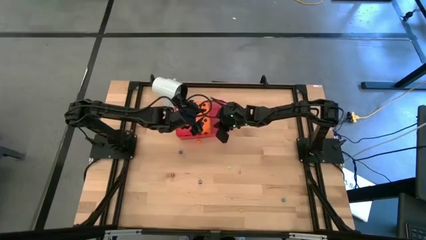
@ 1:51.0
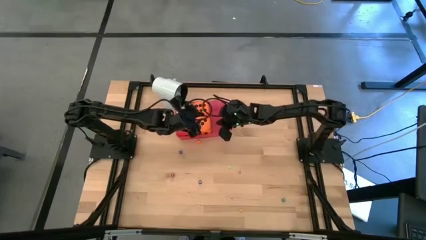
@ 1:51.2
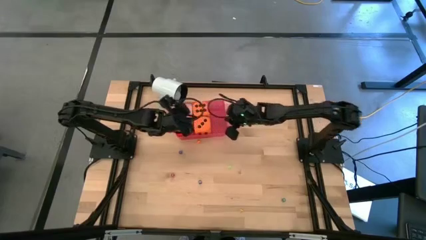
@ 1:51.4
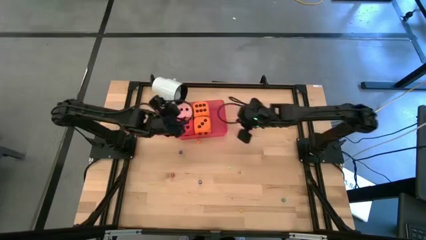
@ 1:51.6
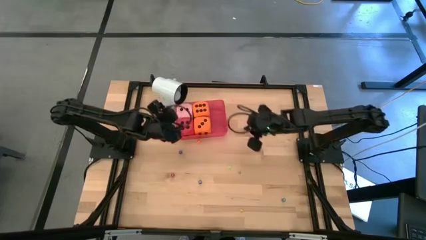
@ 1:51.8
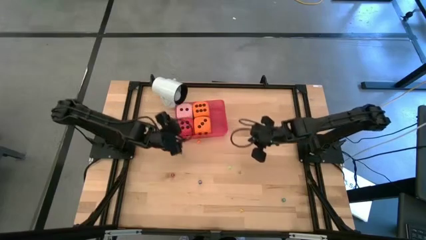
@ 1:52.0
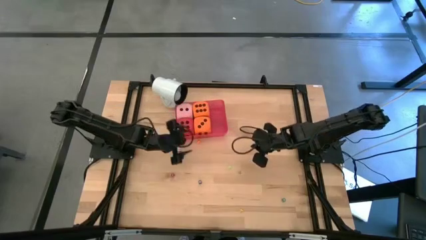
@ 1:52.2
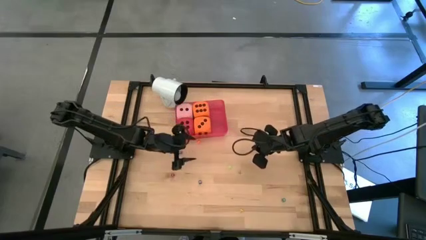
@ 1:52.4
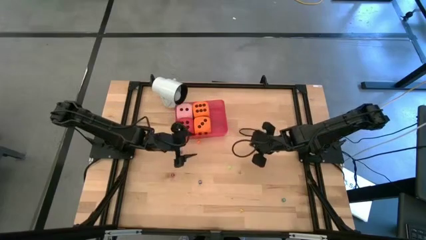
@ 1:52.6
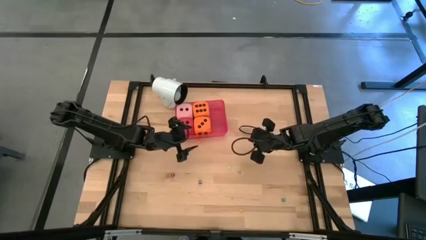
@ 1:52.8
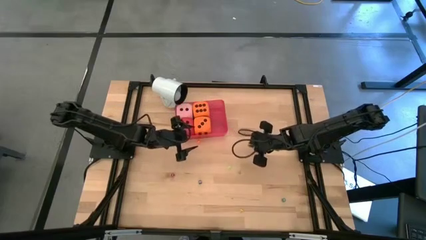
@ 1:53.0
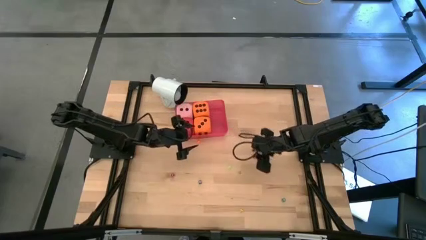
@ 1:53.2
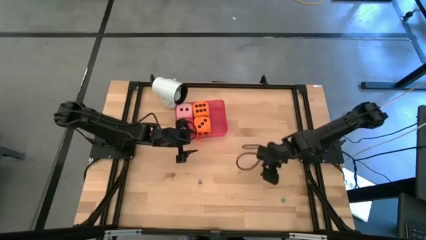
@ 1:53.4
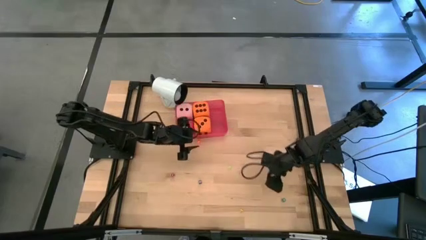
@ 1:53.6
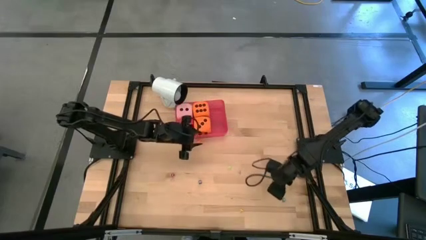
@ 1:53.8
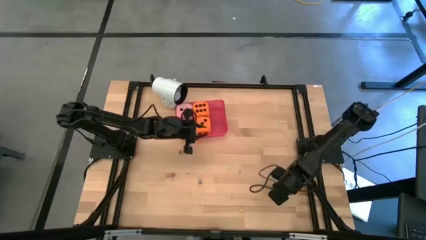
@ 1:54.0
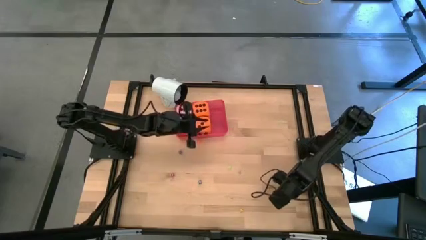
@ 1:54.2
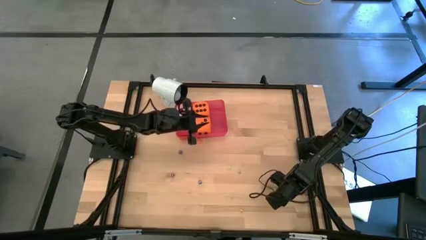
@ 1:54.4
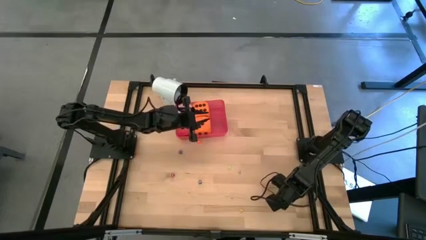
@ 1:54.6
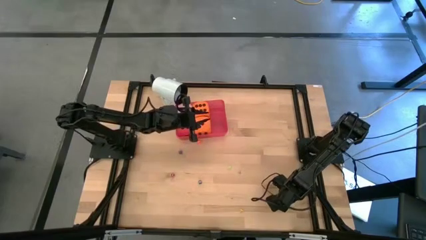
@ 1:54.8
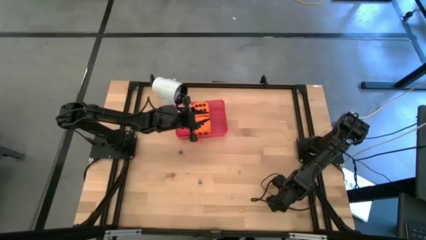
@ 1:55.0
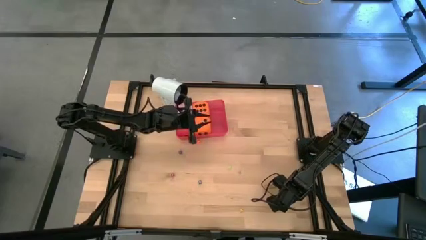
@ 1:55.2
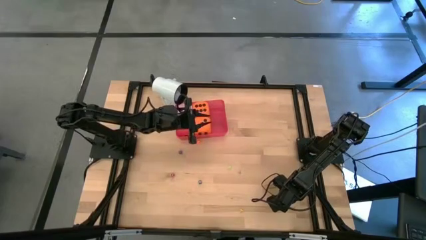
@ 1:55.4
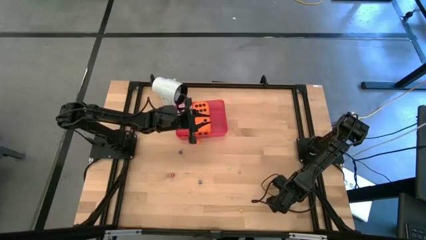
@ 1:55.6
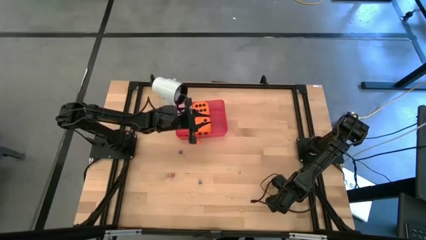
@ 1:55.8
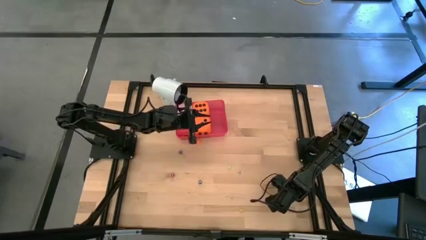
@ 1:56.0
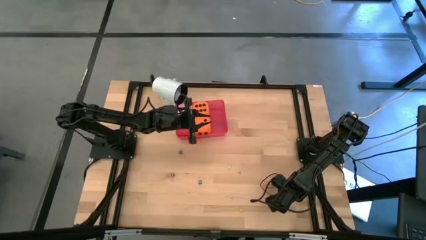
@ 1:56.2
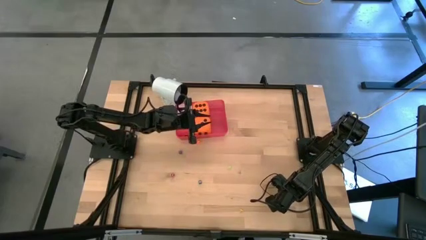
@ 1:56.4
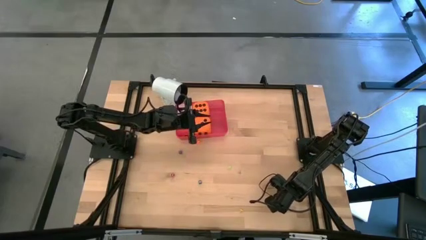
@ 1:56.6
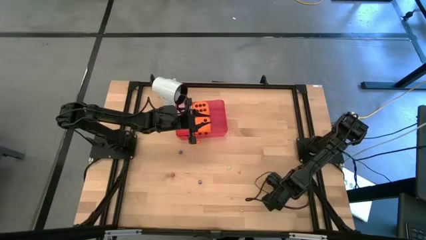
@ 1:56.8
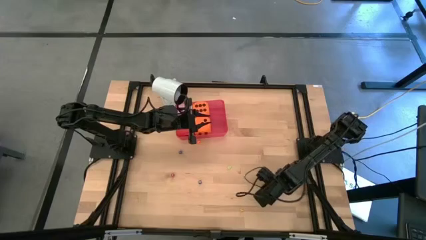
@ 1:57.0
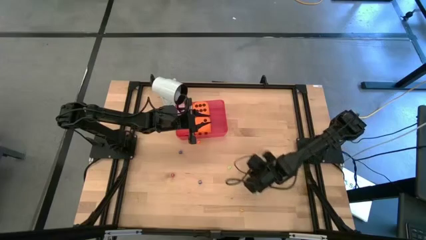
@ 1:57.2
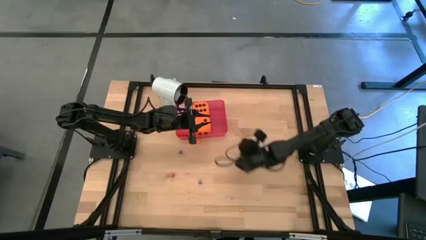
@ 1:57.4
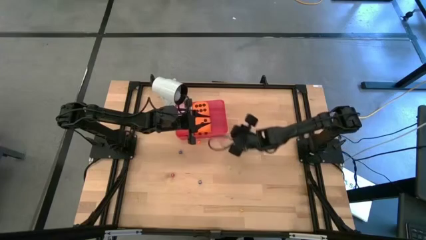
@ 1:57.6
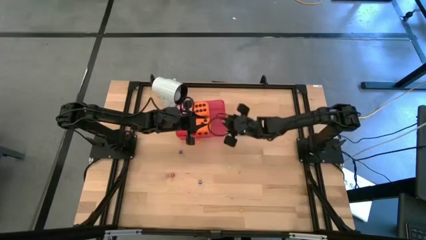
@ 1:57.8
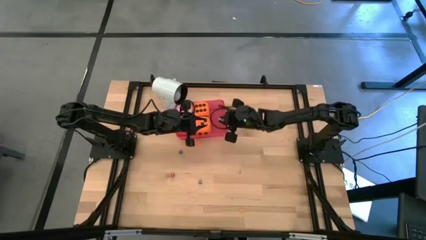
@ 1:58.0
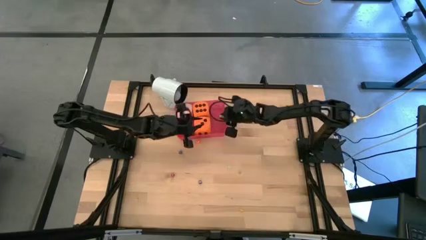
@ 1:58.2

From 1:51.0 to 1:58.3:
Task: Pick & Place Dice
Put the small green dice into the red bin

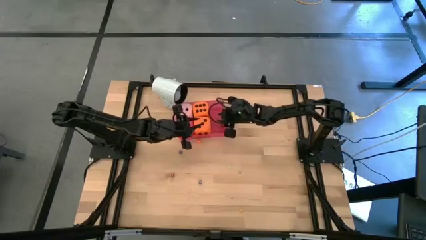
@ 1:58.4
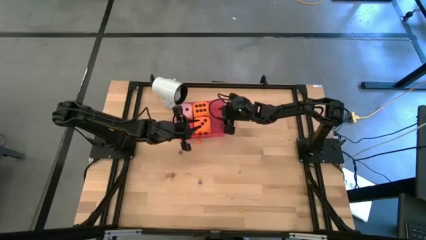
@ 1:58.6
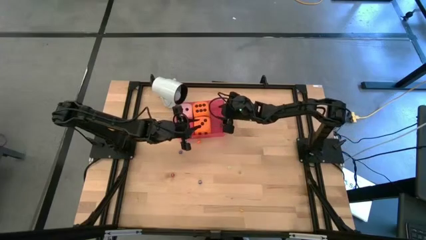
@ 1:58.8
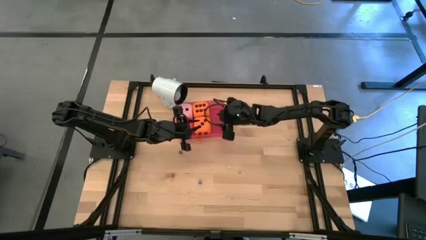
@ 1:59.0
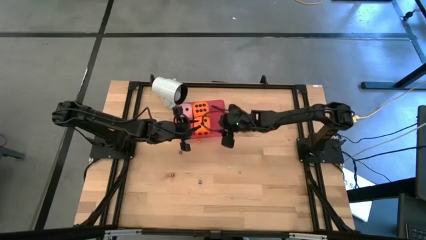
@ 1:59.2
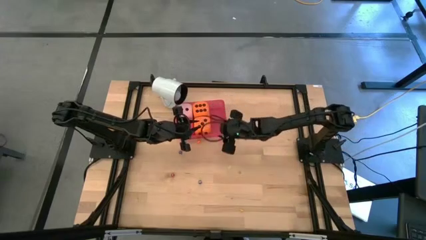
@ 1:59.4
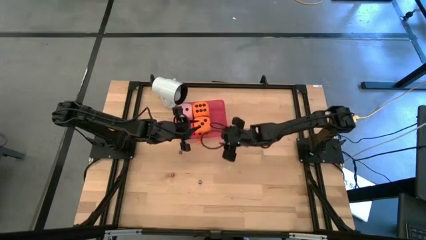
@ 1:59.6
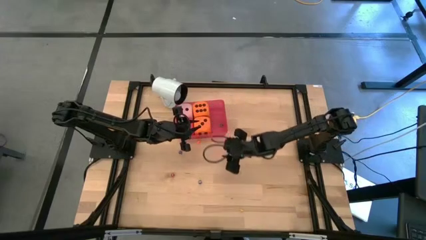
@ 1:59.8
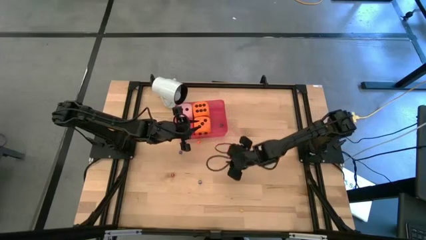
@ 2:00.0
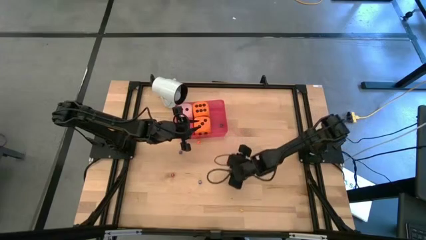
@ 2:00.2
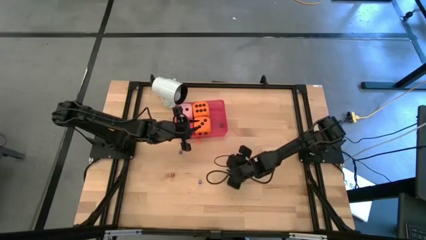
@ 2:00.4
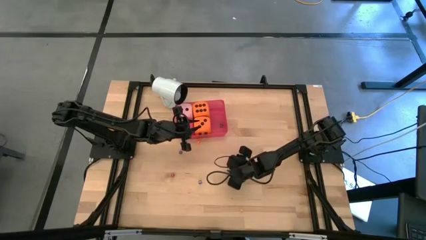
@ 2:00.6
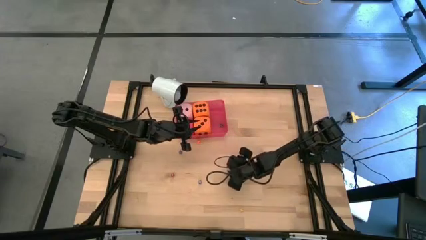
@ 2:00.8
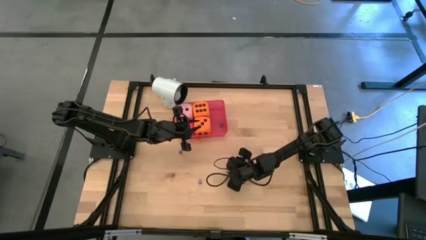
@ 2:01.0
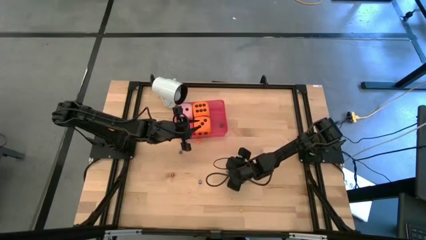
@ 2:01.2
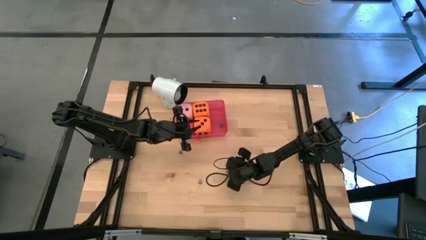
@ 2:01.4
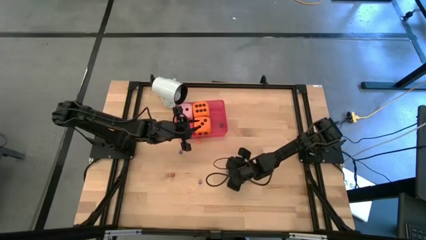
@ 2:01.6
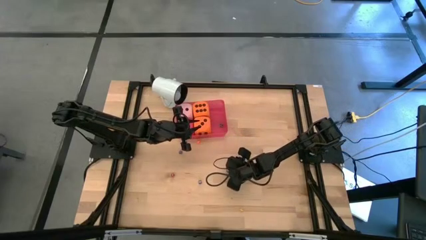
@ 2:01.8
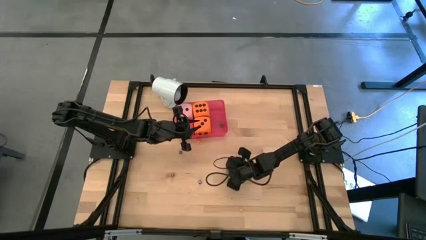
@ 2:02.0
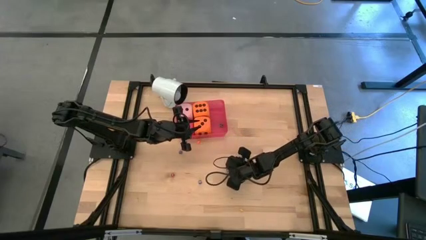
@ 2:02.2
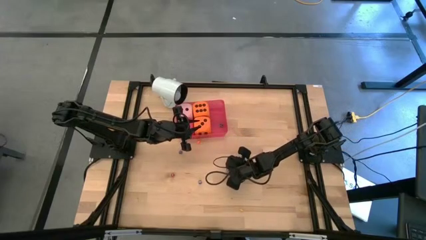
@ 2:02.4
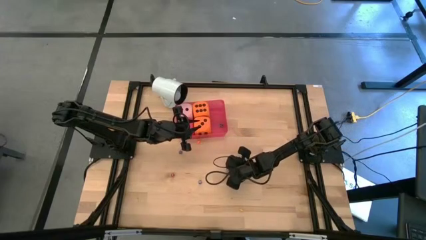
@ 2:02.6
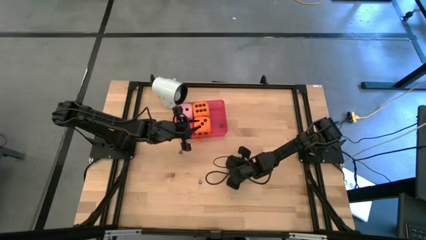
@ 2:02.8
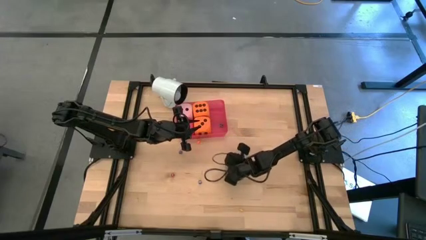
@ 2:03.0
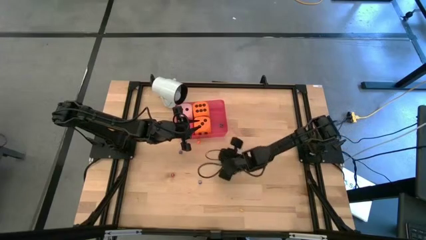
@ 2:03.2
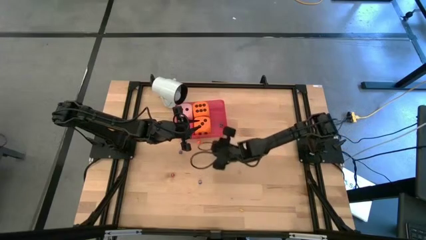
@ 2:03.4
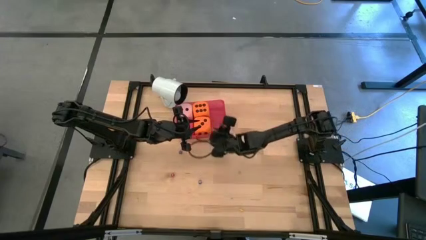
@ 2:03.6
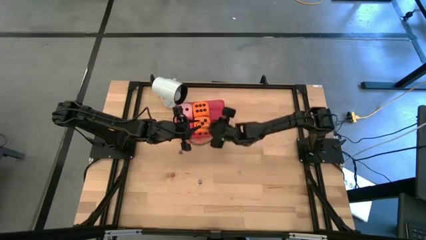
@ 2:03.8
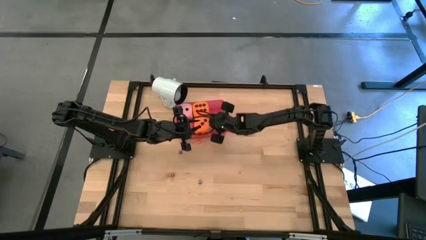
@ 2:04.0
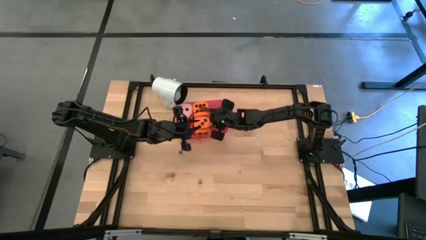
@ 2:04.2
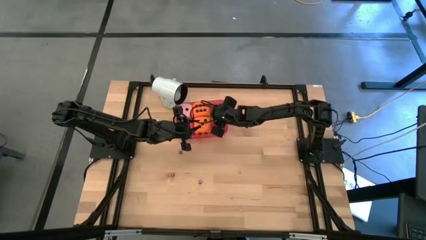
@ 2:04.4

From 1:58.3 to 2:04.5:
Put the small light green dice into the red bin

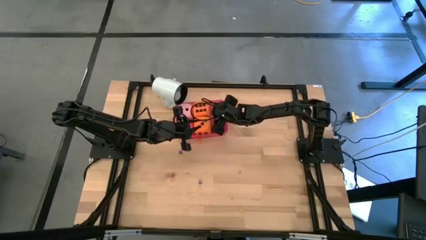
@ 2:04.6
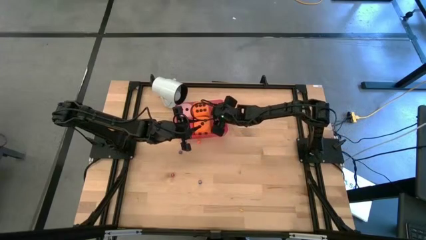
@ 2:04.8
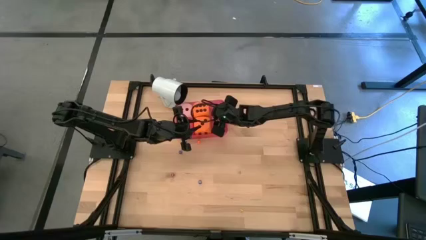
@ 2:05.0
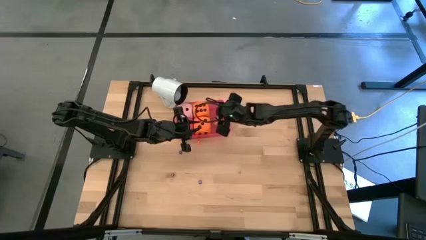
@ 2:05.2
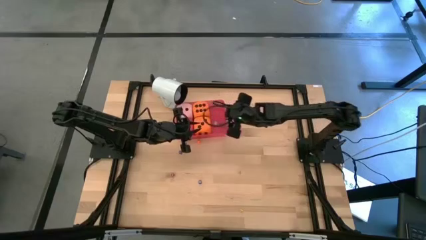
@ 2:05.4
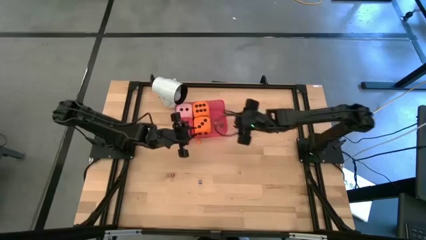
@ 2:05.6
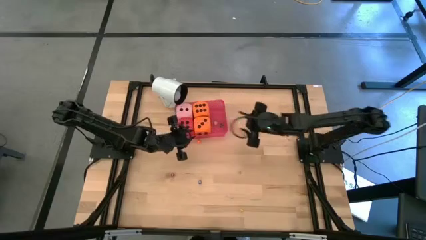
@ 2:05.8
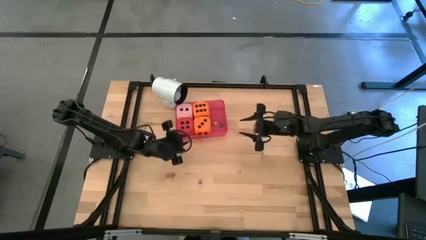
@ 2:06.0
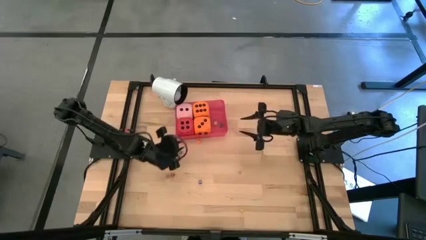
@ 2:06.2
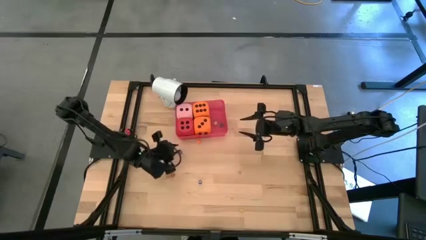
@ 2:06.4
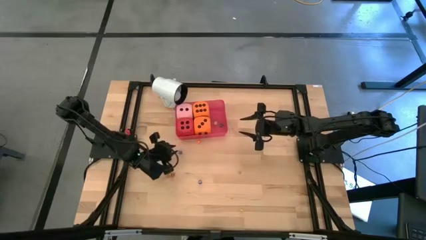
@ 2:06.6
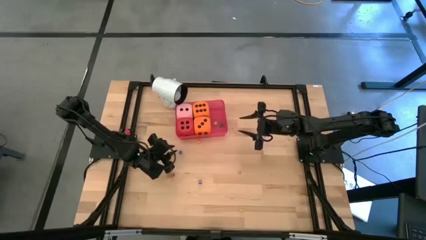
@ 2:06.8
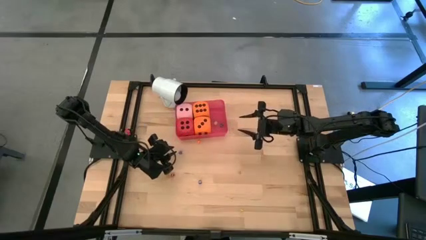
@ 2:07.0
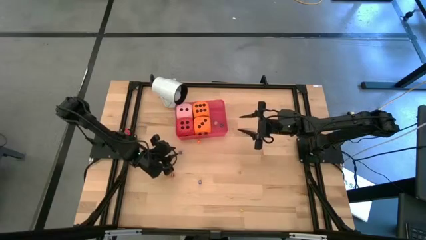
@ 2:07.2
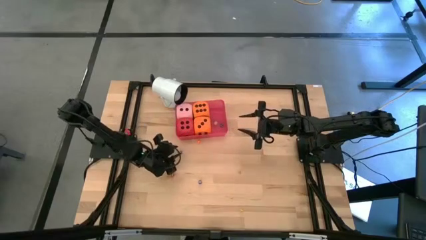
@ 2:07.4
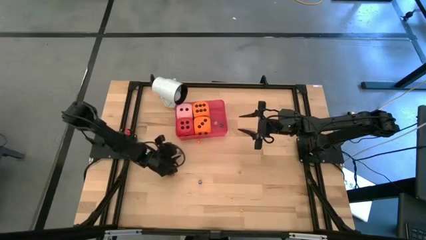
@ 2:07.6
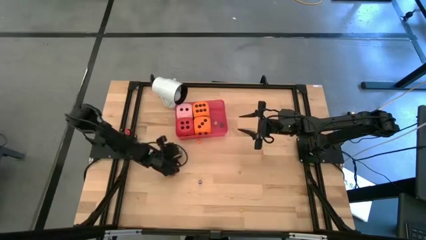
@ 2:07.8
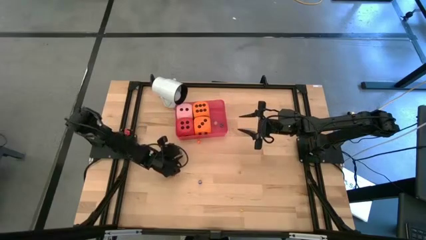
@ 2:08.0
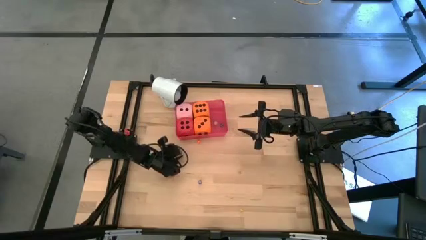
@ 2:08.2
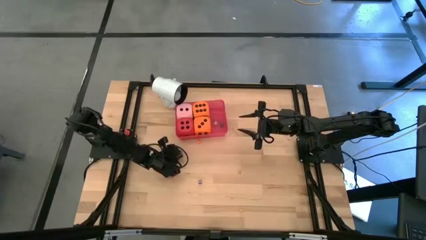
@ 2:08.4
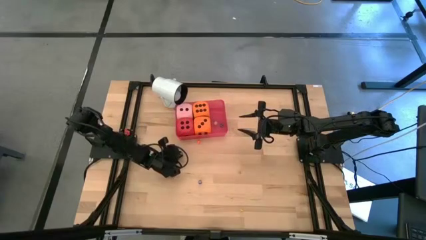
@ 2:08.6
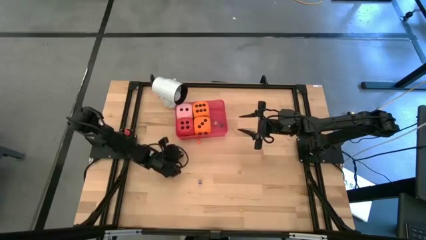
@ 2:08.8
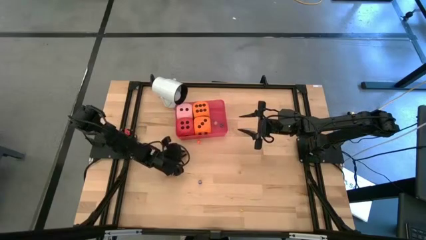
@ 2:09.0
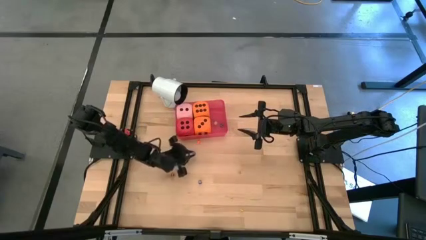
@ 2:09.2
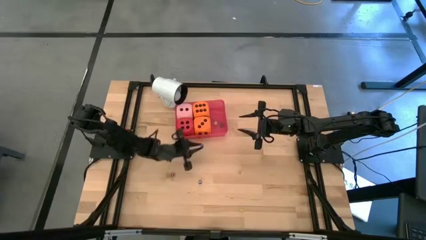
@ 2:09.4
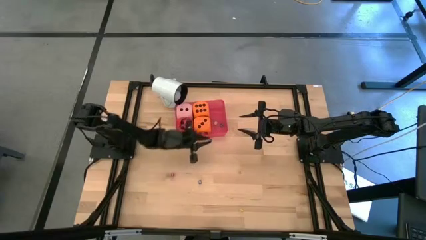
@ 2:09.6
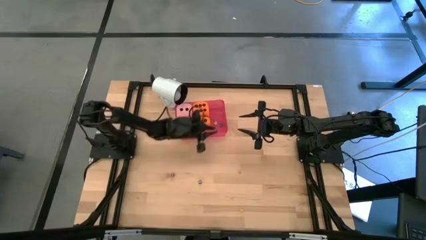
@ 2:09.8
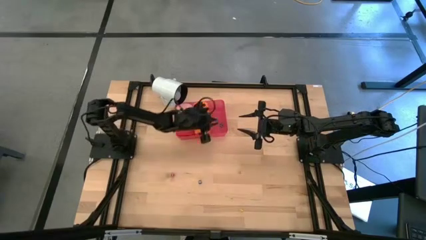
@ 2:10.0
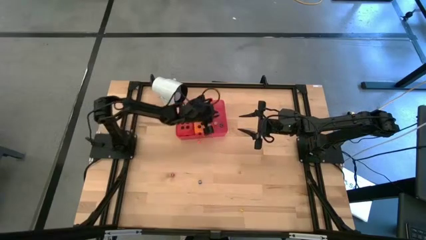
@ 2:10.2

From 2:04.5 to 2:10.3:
Put the top small blue dice into the red bin
